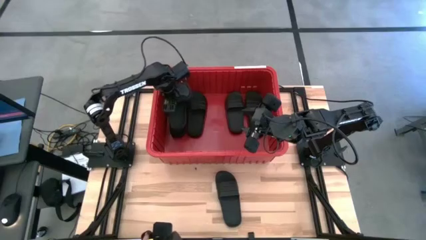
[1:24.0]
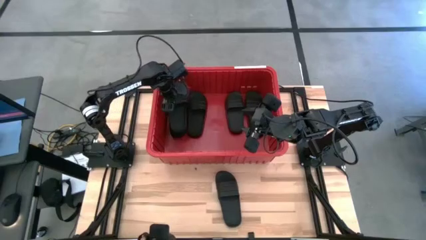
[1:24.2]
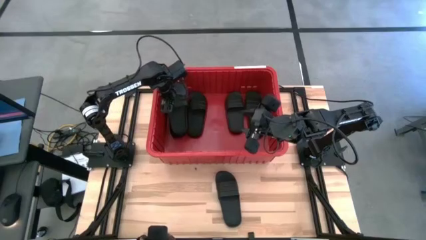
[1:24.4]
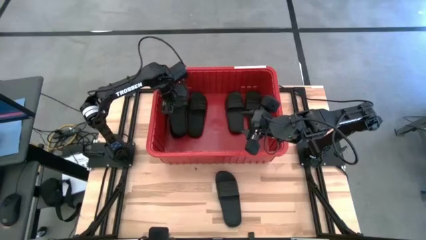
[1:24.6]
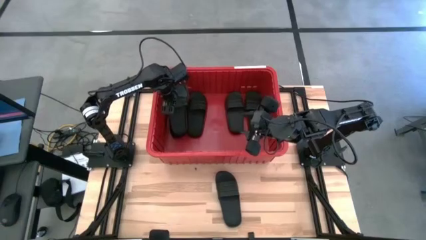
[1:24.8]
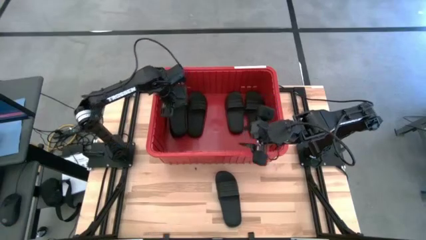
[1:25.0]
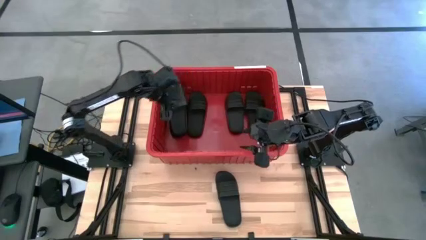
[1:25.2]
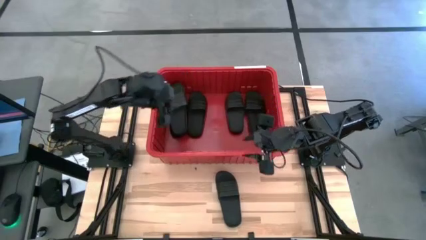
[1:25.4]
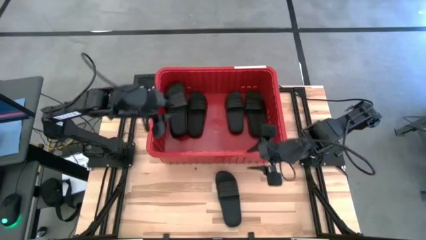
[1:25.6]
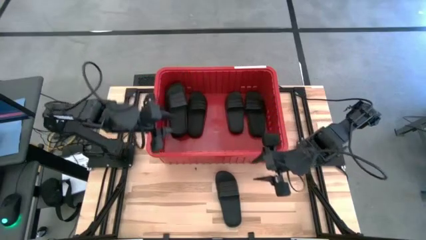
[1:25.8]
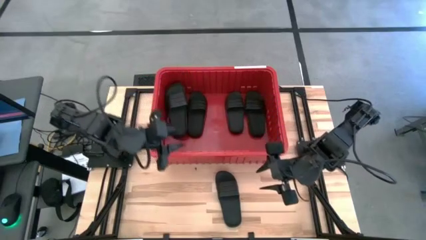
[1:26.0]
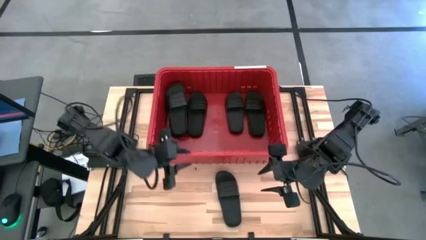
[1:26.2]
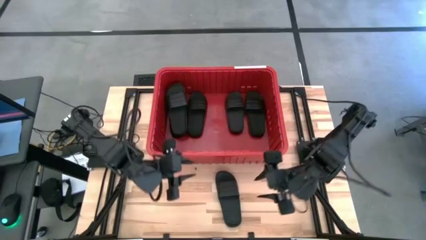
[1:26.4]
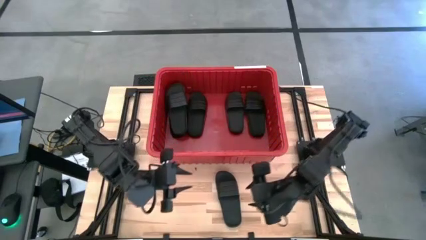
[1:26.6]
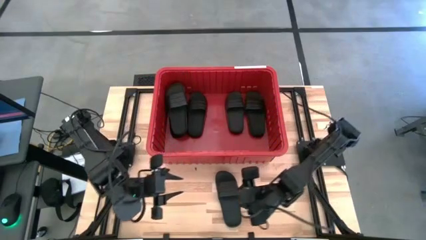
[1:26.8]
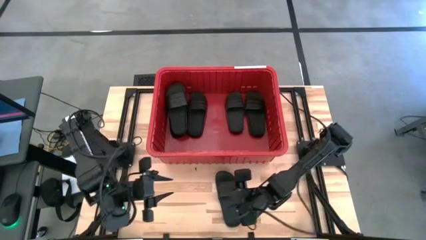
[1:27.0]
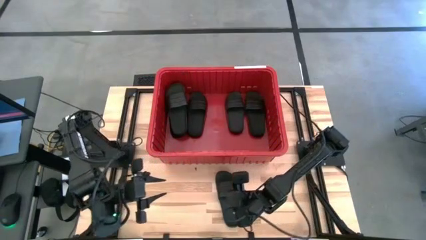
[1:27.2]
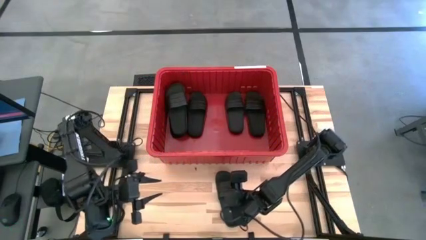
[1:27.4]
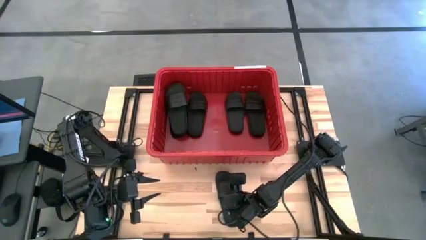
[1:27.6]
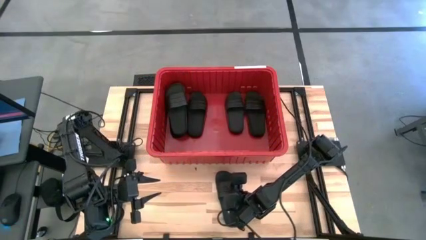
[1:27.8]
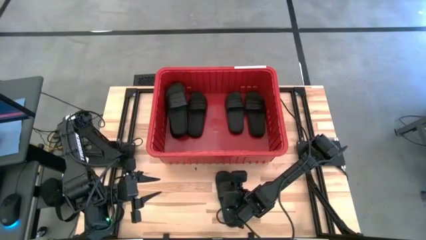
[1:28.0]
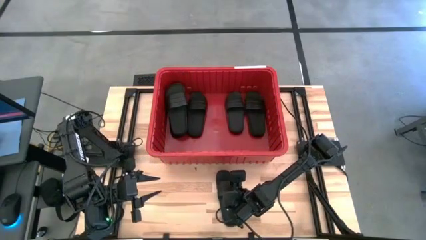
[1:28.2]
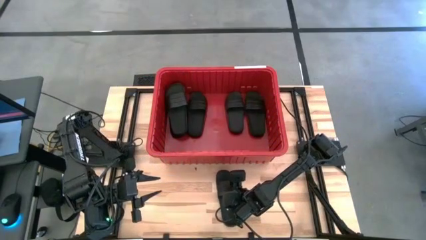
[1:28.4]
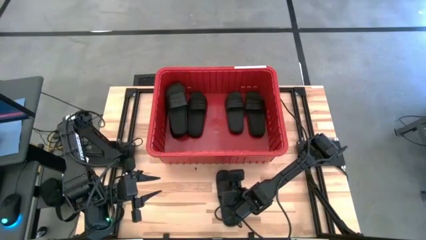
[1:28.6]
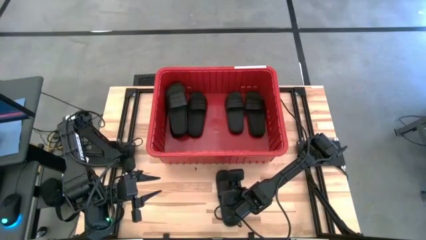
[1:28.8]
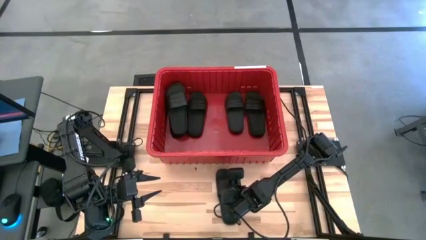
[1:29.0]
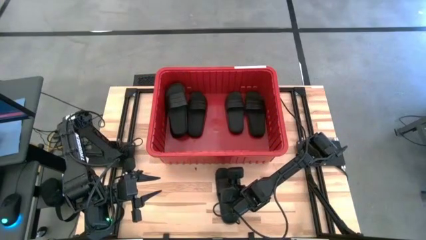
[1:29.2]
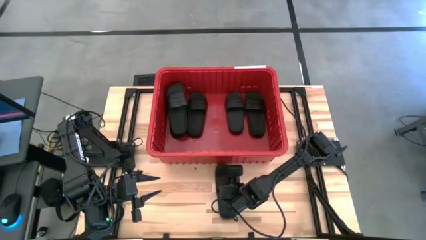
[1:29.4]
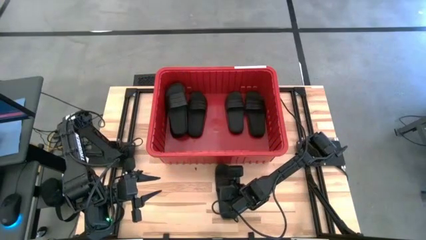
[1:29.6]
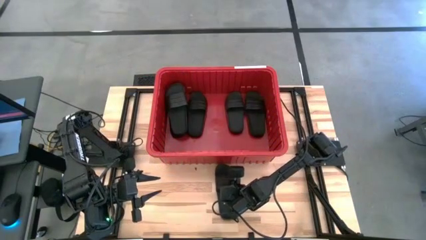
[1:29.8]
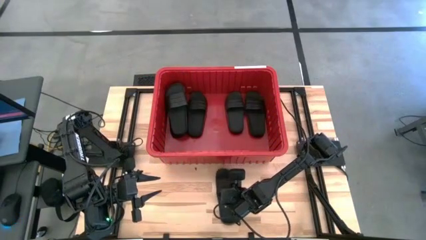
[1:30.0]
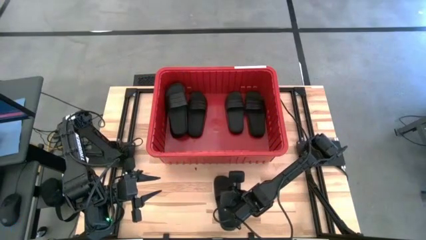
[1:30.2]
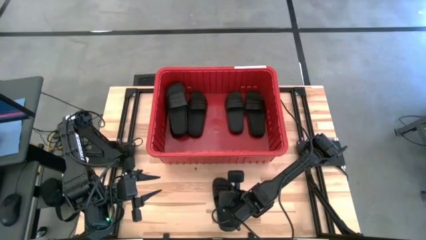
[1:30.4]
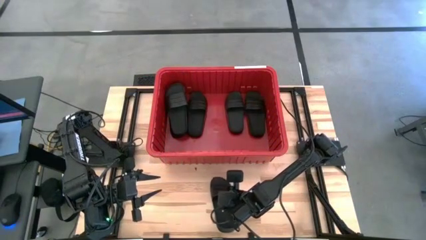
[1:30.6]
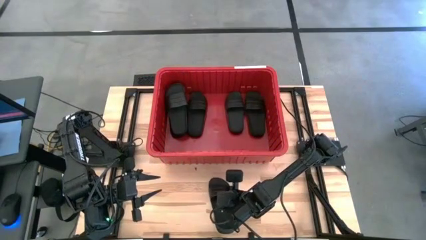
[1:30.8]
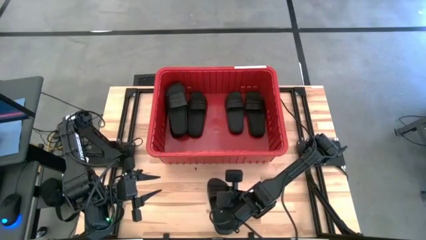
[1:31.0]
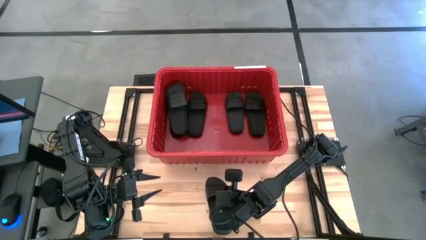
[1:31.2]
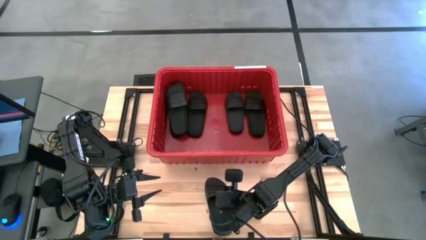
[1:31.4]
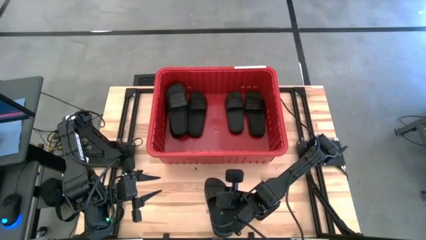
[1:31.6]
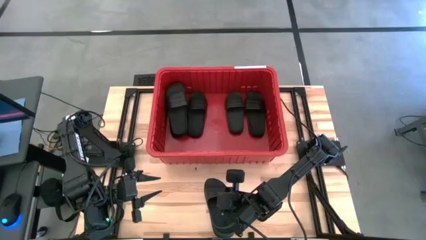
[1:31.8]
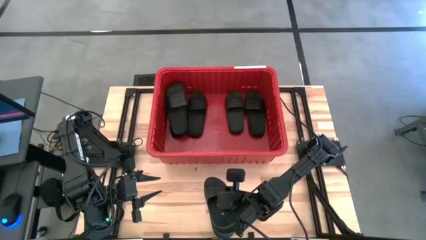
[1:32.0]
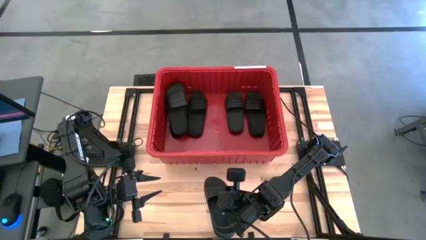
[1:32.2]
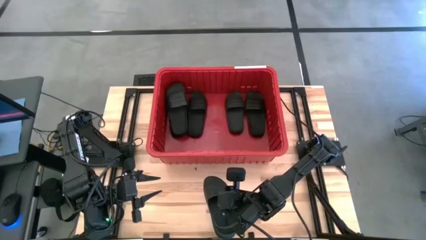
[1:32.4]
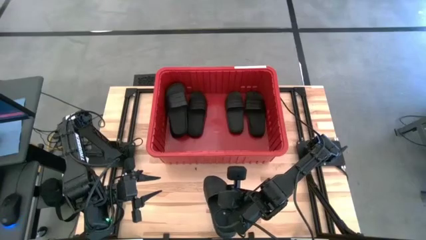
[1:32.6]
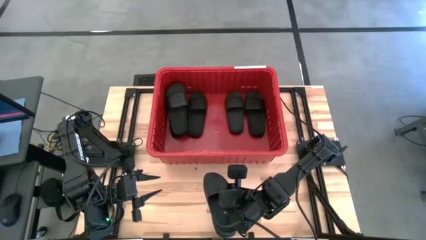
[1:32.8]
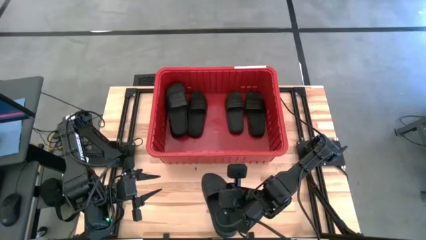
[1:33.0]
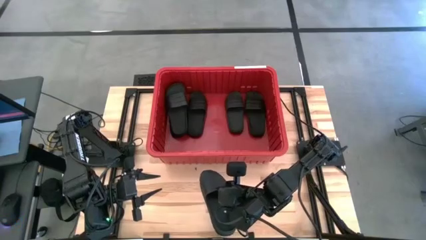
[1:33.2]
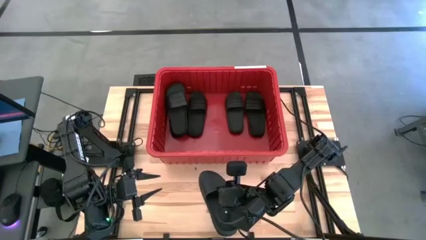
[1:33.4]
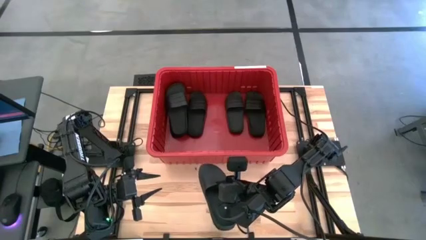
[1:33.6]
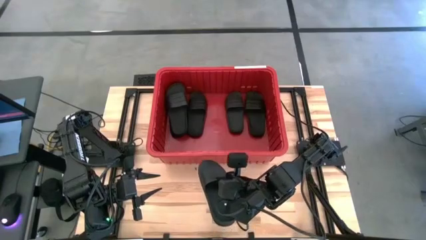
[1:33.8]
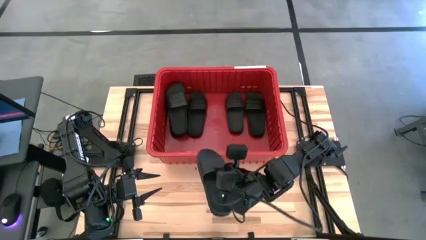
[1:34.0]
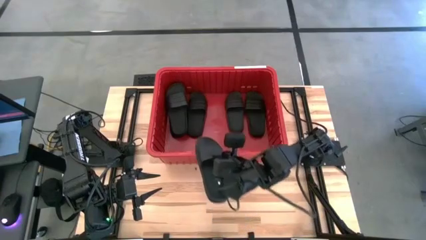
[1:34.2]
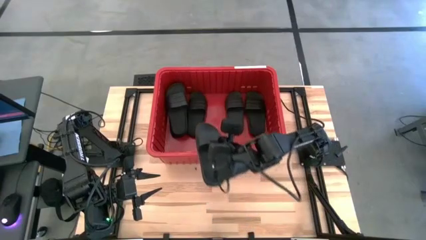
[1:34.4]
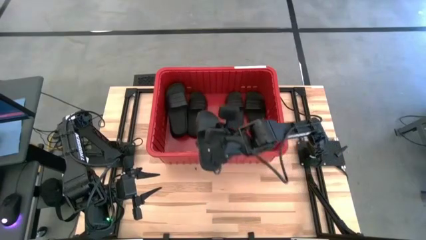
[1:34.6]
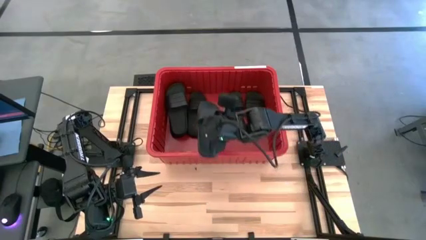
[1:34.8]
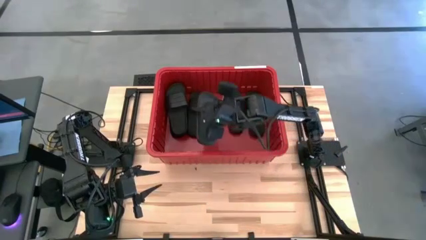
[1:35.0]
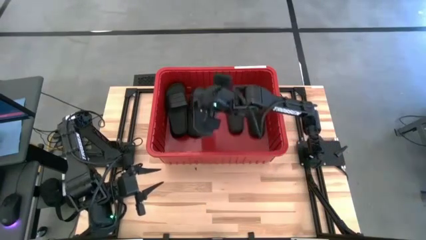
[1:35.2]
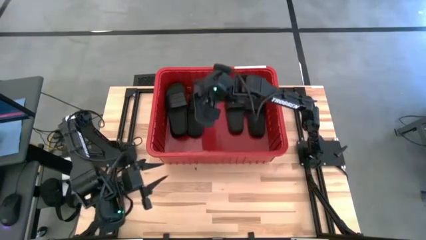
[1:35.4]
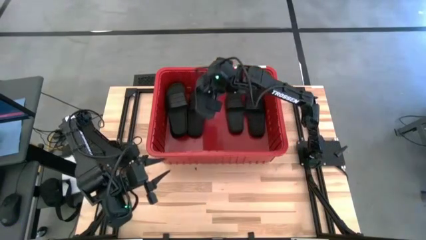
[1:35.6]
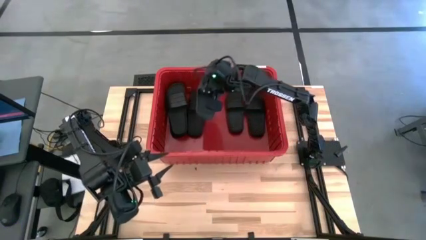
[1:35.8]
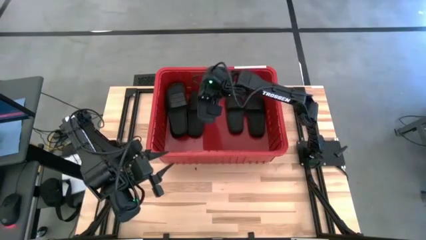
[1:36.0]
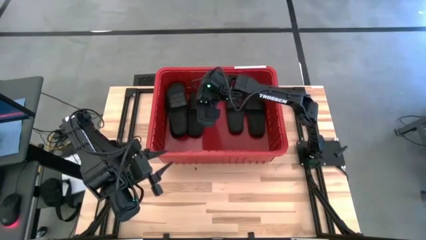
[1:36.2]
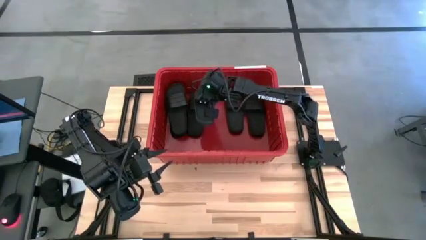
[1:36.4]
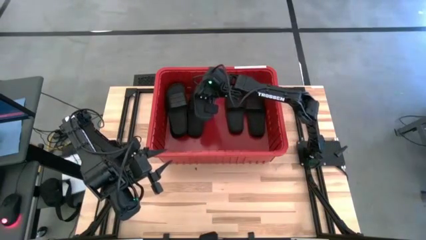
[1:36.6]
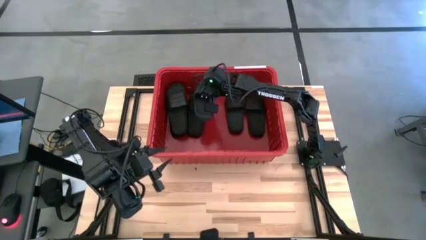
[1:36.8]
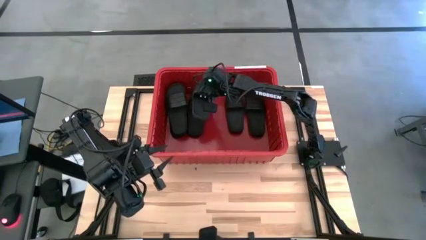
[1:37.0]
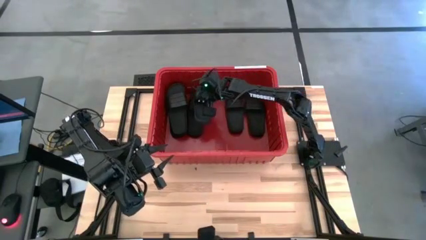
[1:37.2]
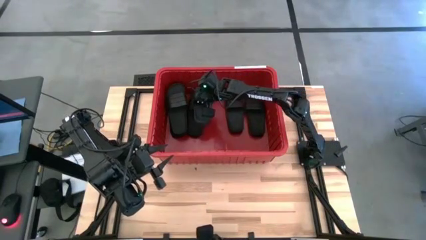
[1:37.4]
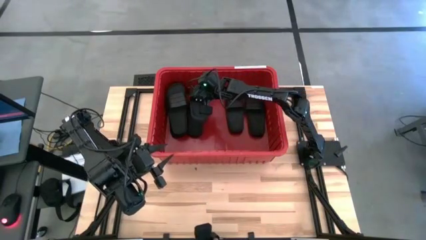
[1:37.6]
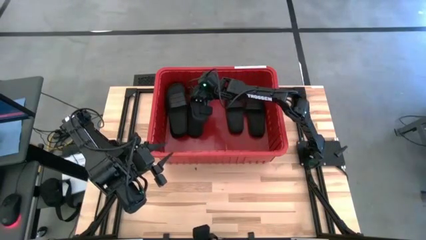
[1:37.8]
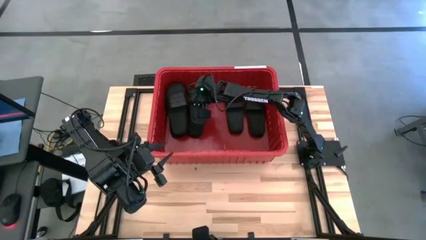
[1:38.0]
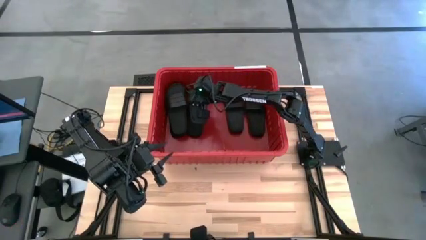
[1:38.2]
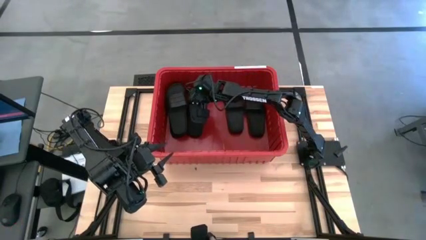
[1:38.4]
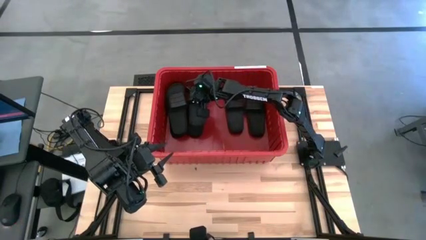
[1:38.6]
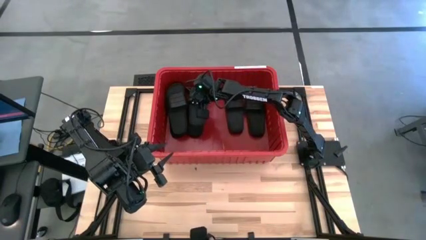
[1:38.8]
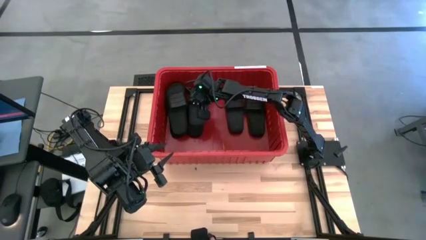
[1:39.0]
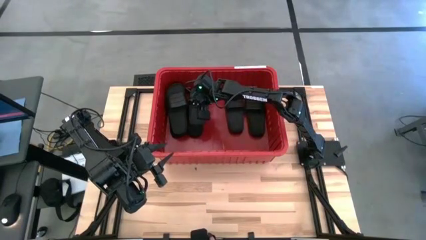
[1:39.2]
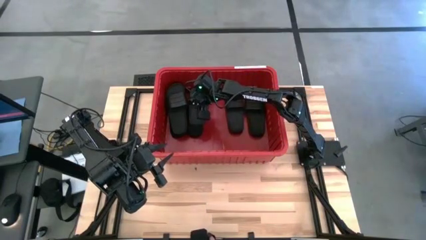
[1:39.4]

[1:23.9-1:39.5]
Task: Pick and place slides into bin
Put the black slides into the red bin
